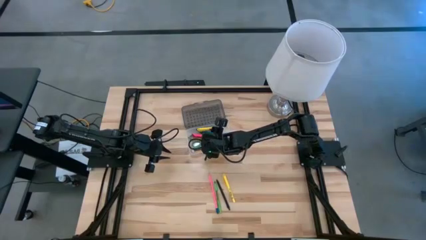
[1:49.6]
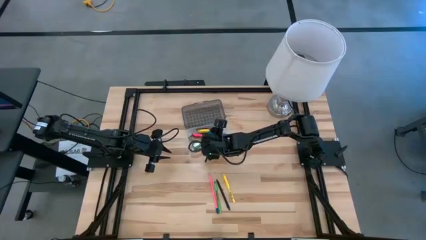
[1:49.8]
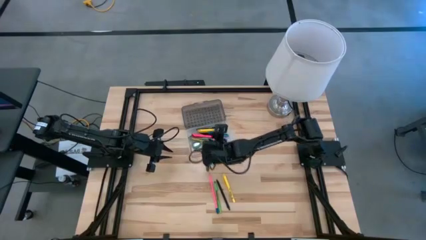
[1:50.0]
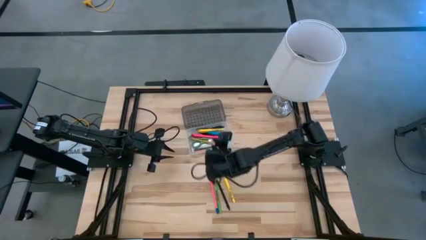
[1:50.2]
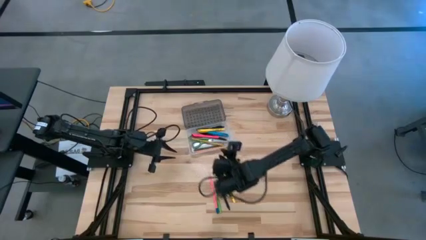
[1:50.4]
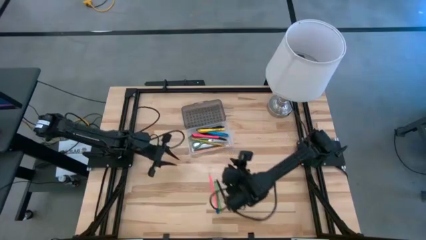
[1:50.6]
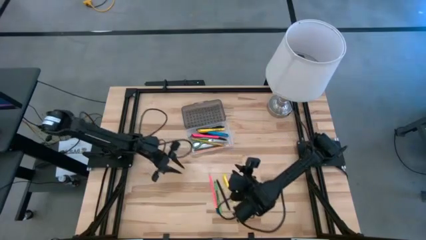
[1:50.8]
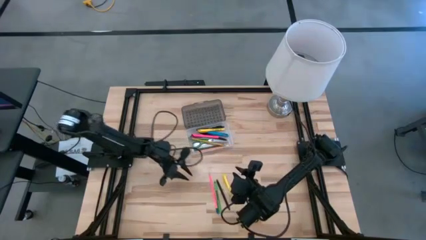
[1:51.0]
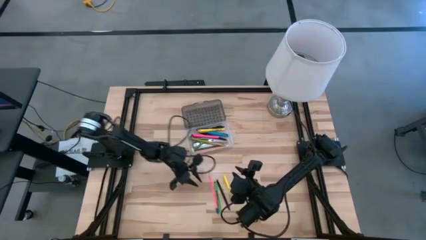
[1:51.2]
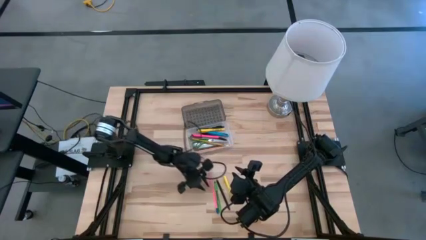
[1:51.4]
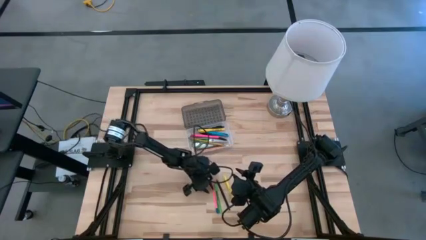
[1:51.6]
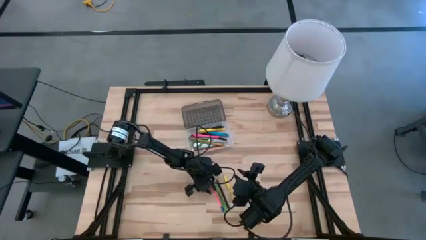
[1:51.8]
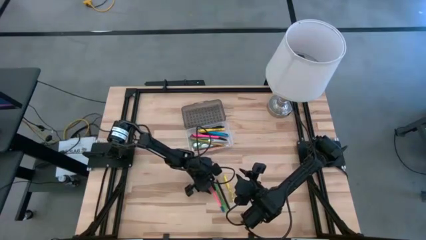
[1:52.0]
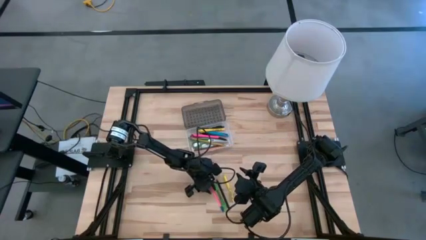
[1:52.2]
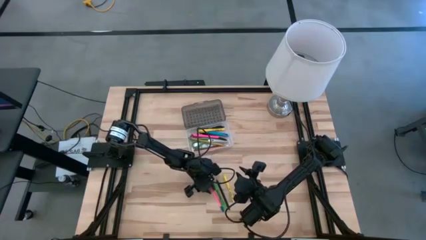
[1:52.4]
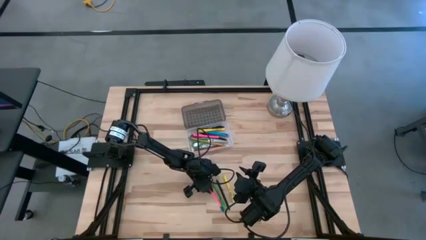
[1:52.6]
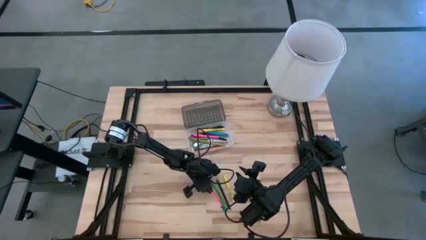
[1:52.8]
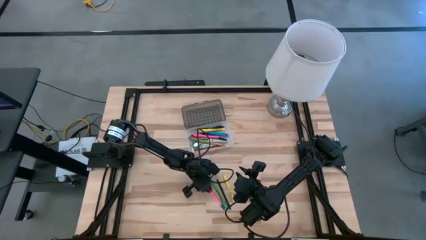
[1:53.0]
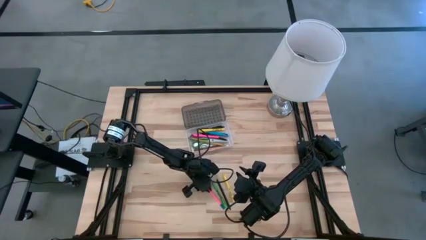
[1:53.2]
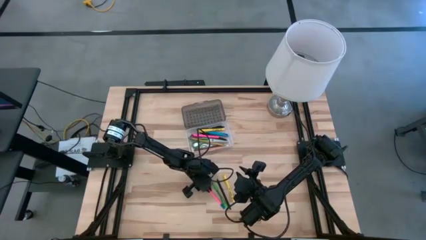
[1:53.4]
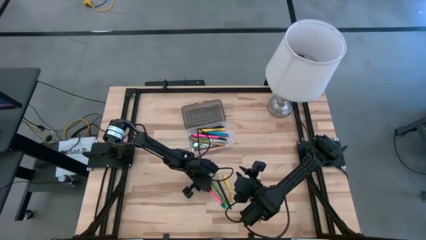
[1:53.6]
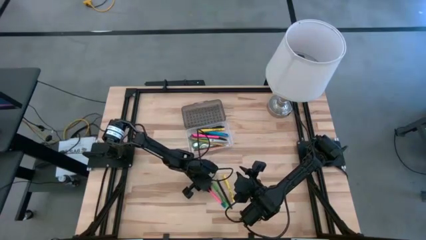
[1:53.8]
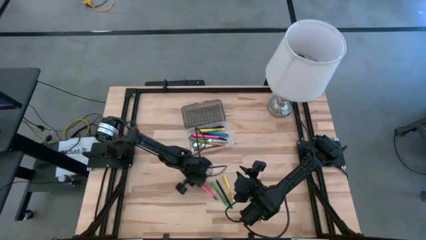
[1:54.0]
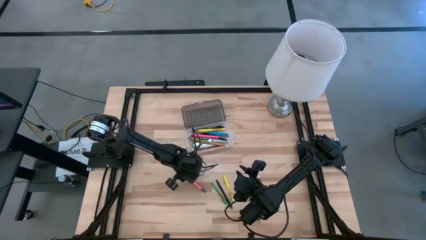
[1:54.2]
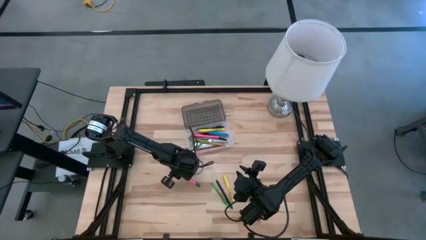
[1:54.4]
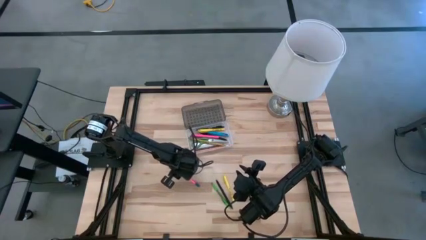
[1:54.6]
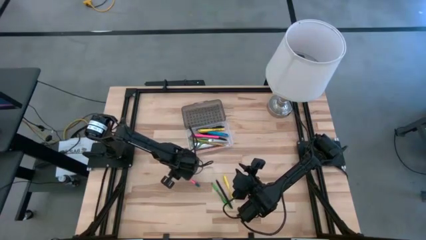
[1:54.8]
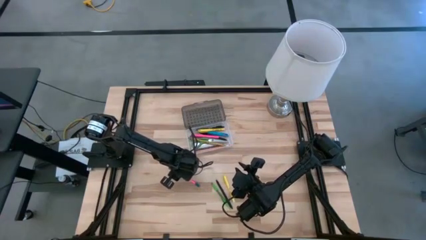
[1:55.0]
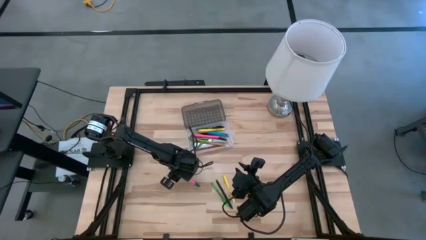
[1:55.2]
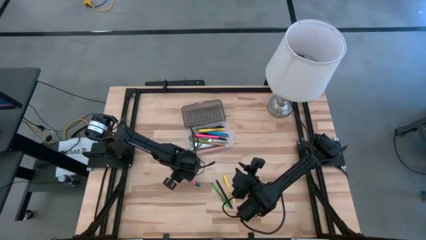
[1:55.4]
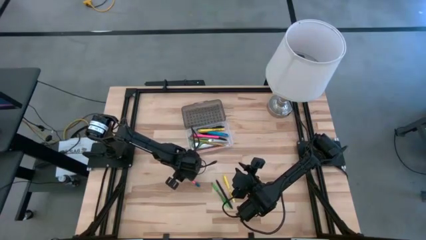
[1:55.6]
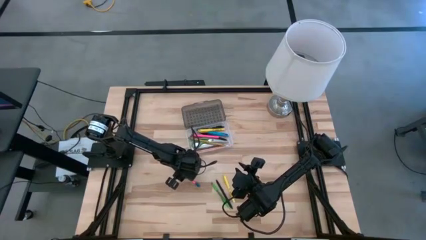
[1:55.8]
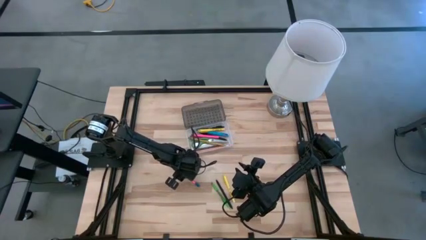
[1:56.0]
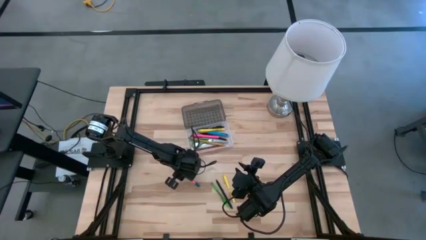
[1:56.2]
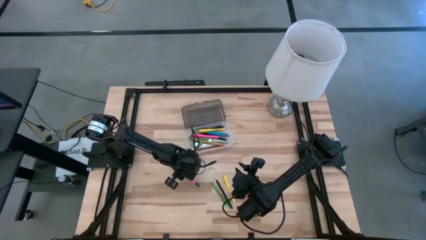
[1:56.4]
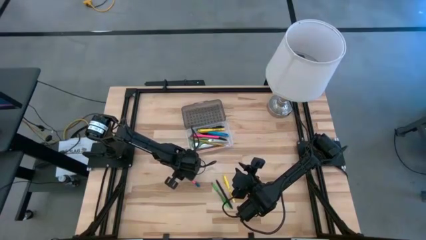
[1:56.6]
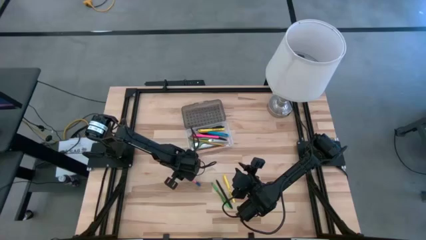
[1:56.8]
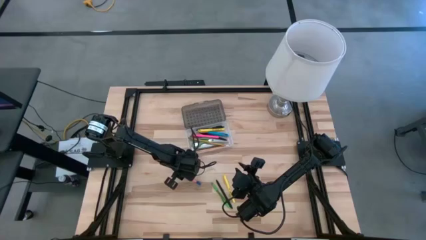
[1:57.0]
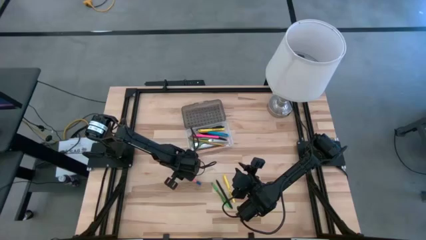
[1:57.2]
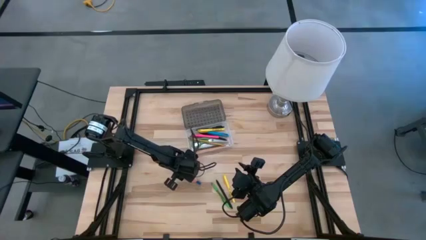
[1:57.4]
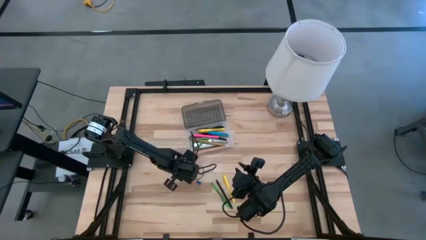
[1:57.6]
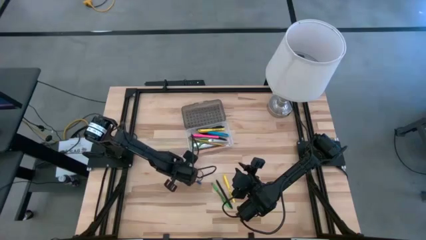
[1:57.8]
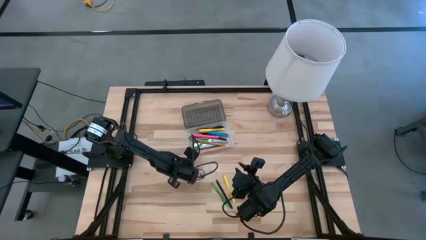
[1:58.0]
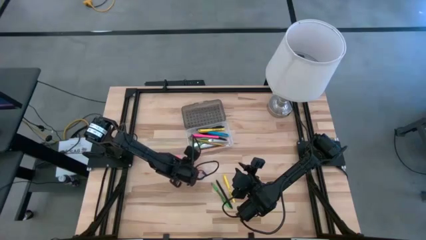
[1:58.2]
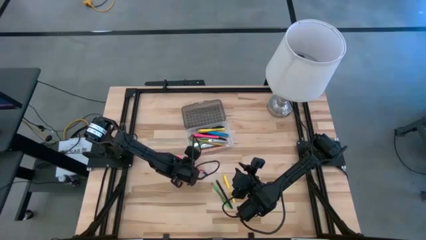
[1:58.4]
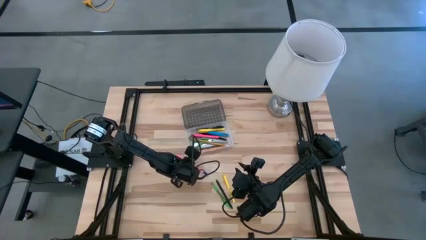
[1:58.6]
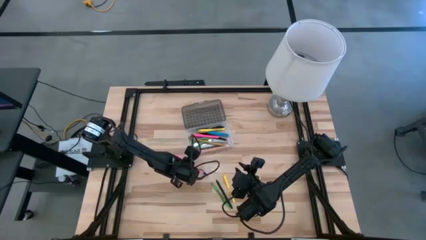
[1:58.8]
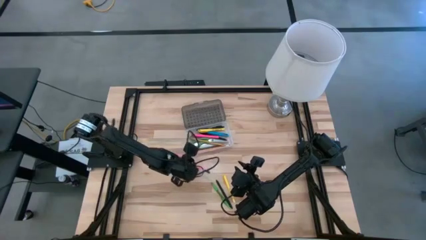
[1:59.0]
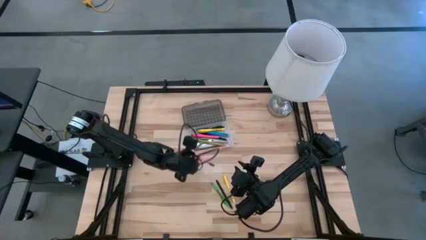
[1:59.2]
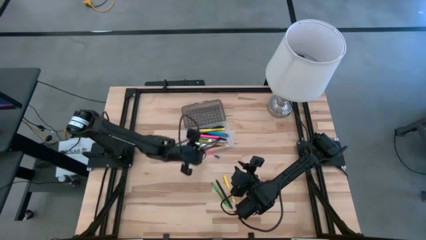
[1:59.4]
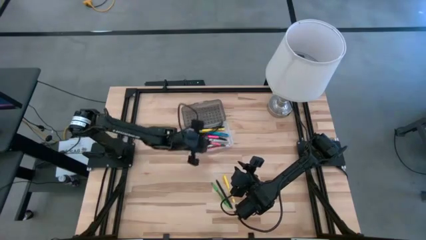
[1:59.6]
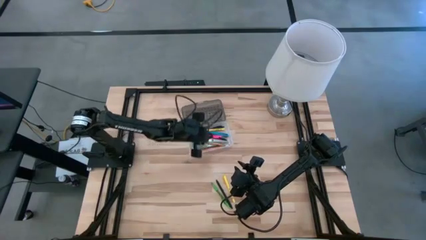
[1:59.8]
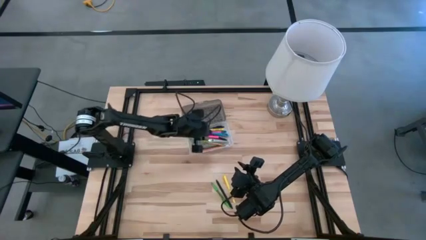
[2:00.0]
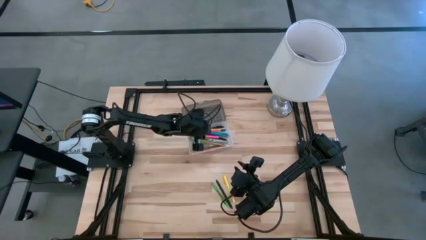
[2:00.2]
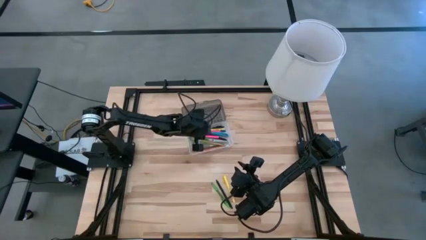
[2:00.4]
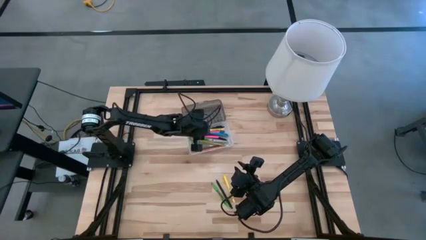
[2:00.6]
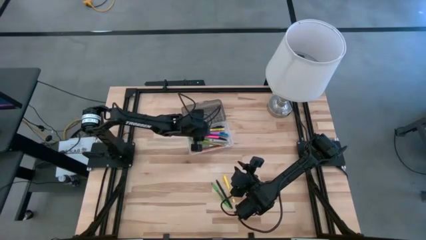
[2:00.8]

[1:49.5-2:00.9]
Task: Pick & place school supplies into a supply box
Put the pink pencil into the transparent supply box
